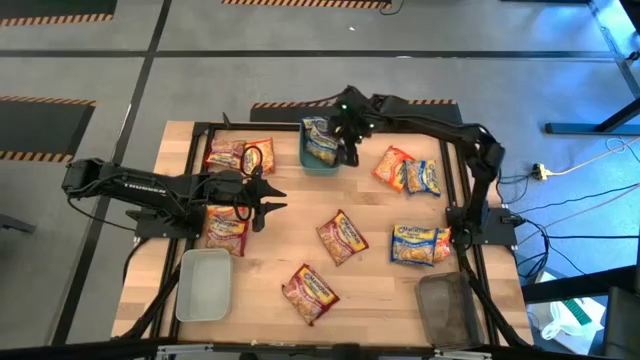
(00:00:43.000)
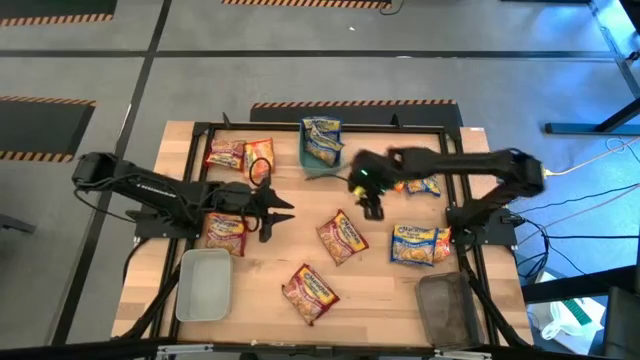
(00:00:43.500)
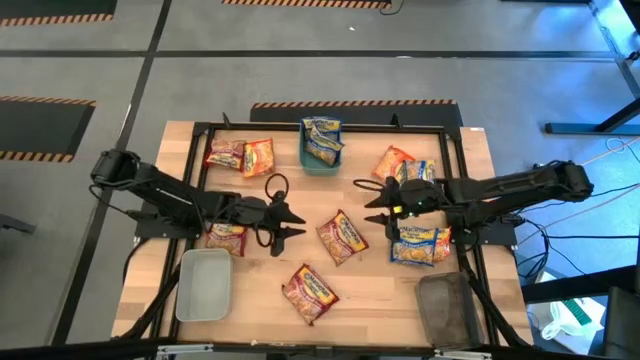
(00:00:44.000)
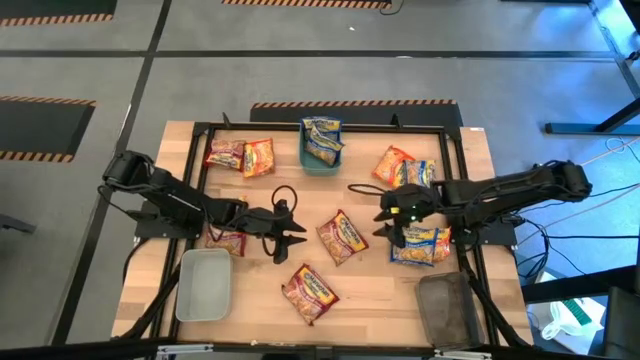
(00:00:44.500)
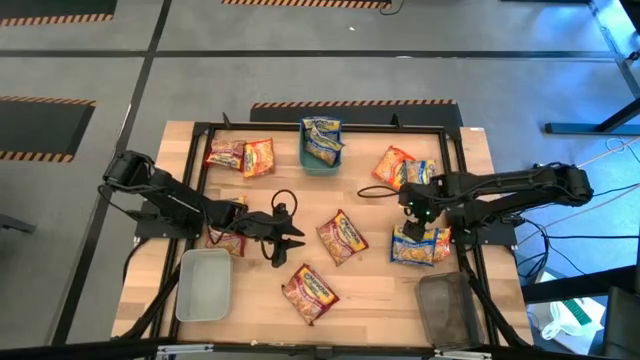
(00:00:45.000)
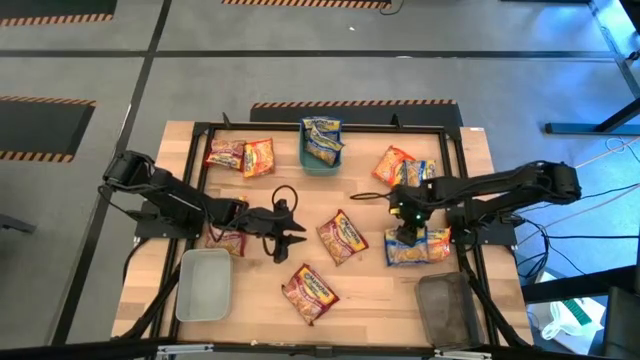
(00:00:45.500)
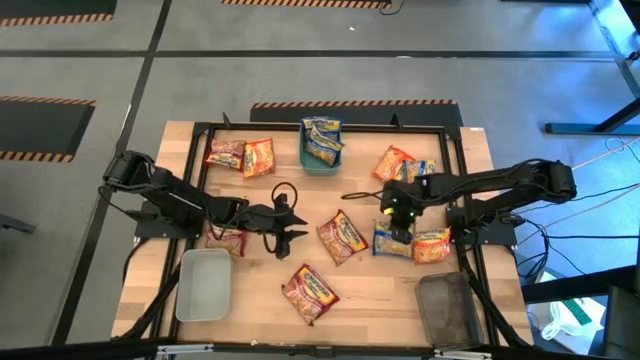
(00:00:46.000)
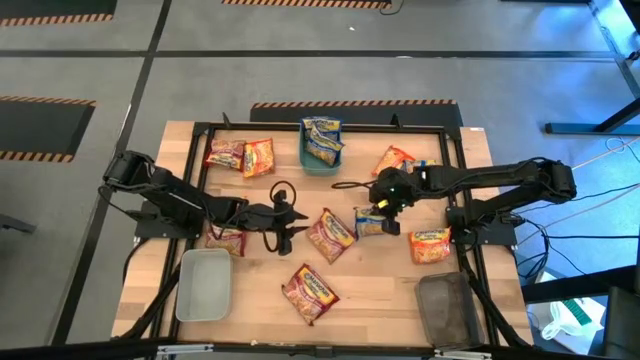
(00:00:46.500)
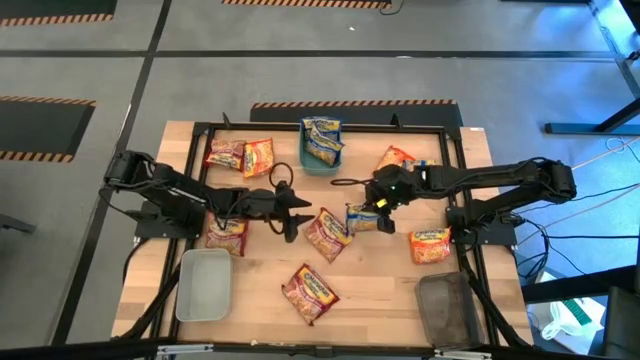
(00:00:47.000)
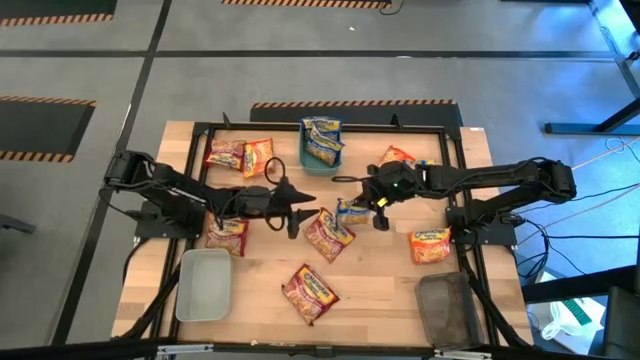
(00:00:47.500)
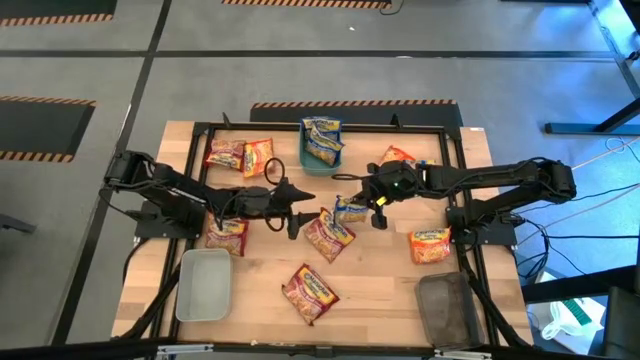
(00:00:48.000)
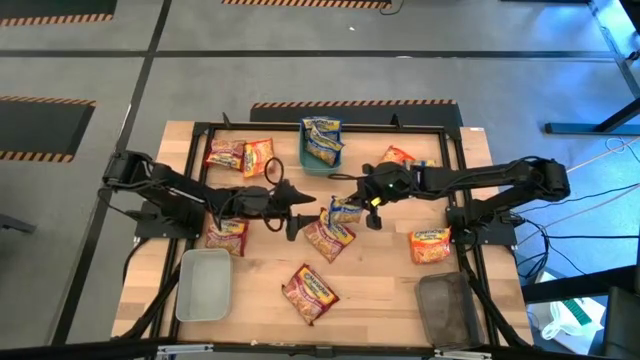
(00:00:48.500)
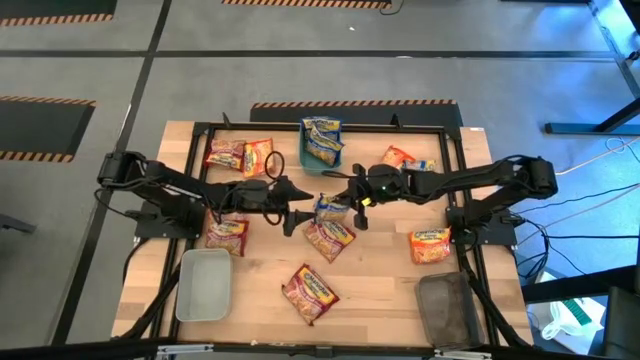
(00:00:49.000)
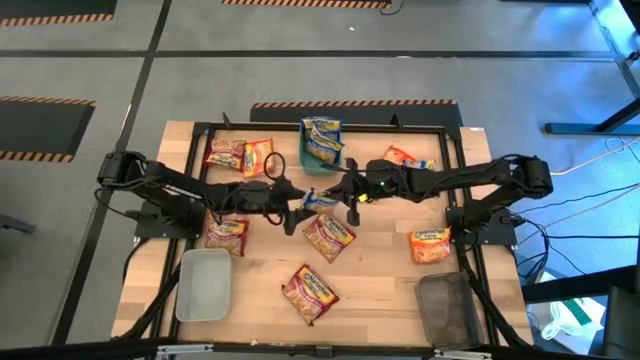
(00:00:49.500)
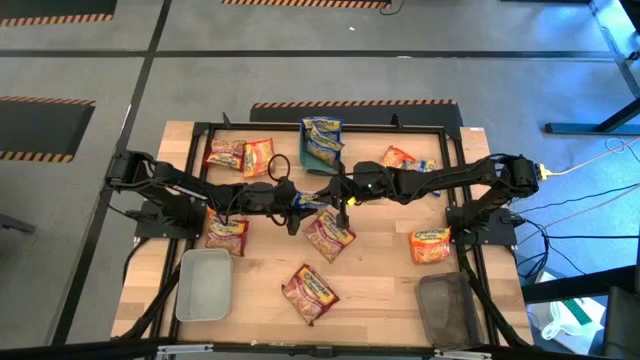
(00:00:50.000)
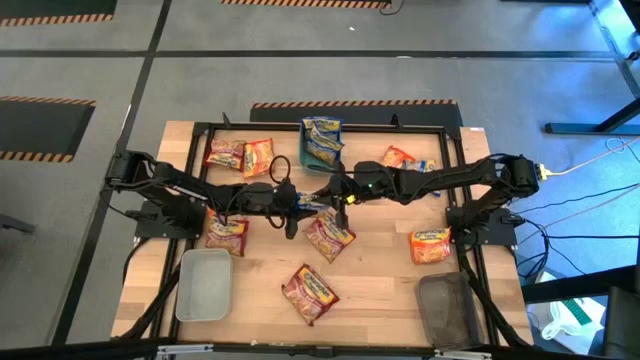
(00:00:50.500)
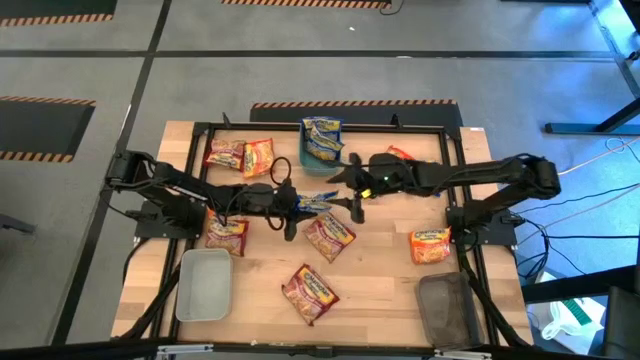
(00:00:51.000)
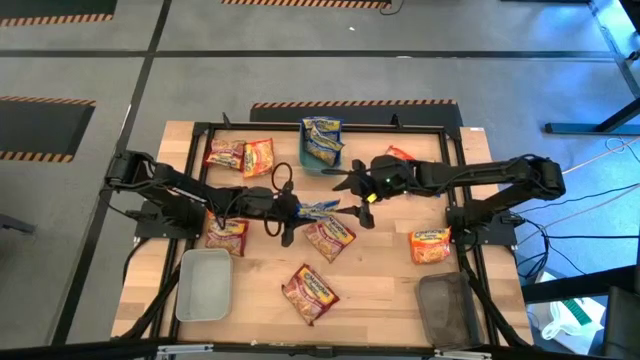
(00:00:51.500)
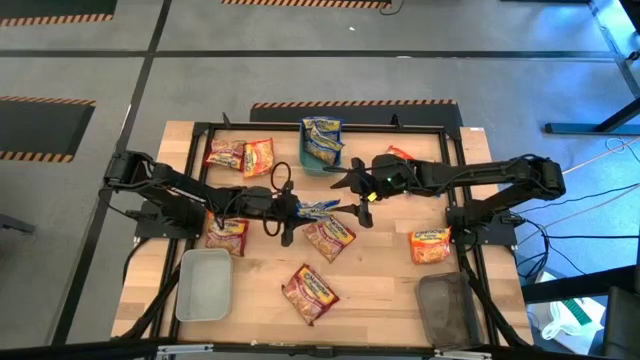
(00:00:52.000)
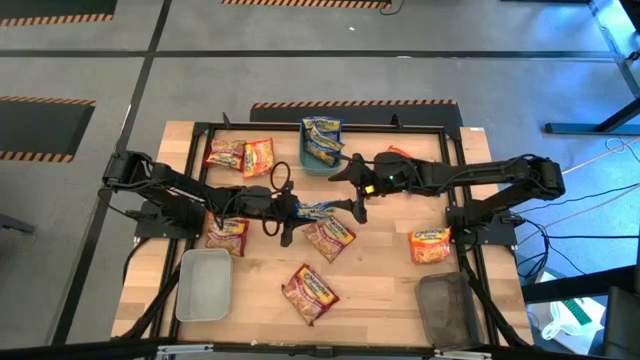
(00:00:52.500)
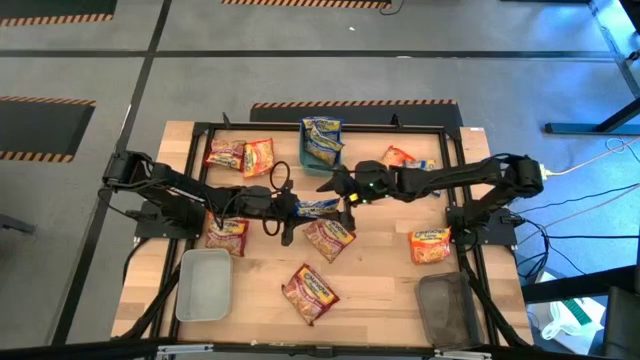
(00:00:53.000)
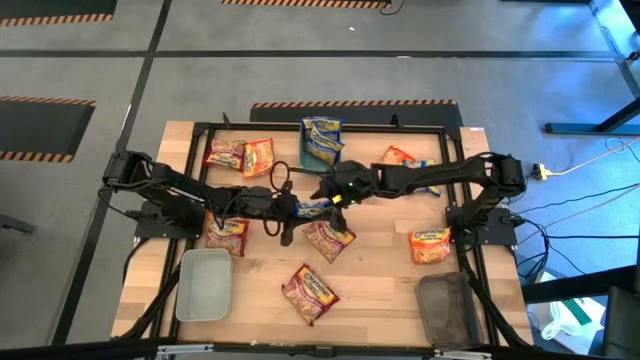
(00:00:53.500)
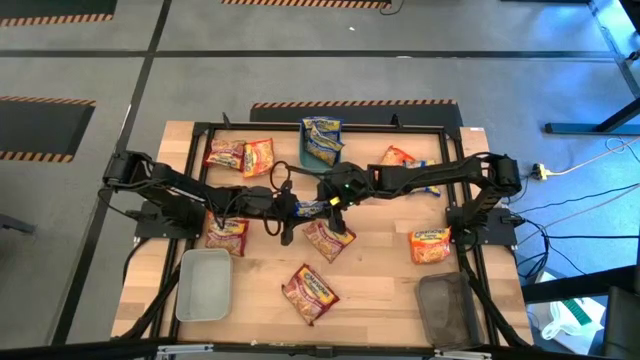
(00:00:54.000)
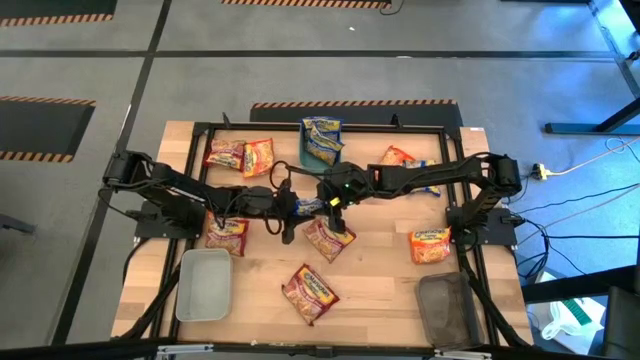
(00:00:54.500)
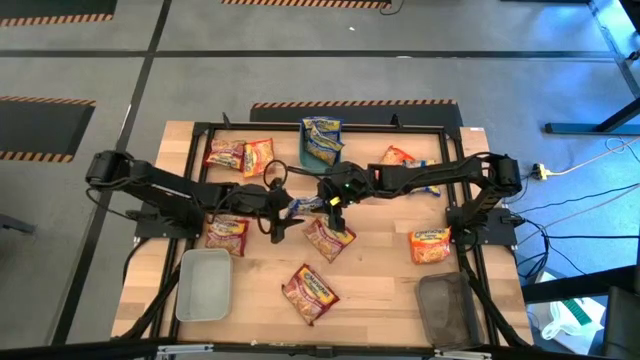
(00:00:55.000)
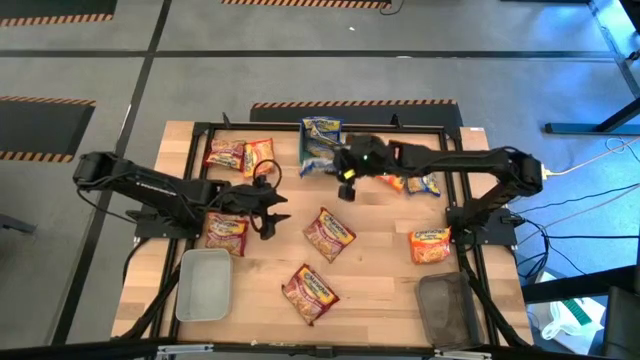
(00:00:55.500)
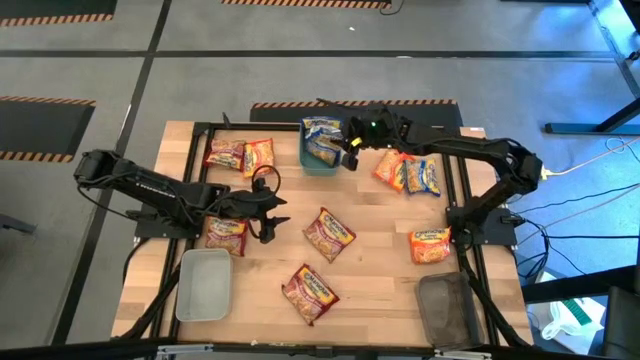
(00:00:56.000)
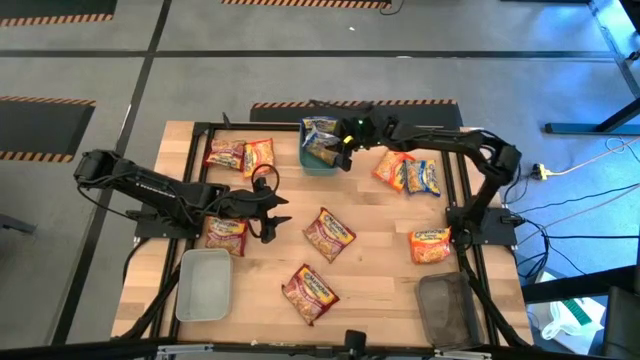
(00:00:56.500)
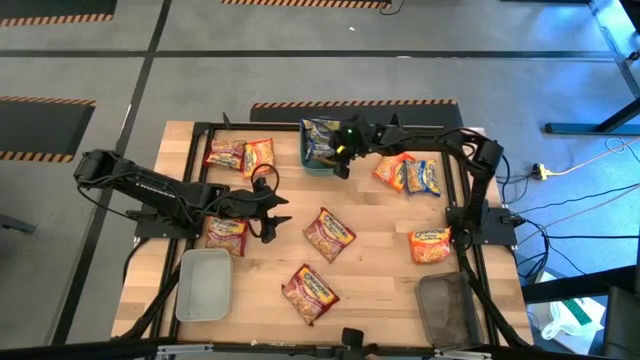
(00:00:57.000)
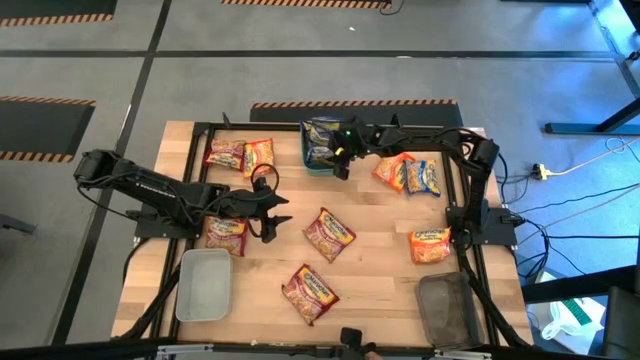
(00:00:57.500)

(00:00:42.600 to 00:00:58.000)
Task: Sort Maruchan noodles
Put the blue noodle pack into the green bin
